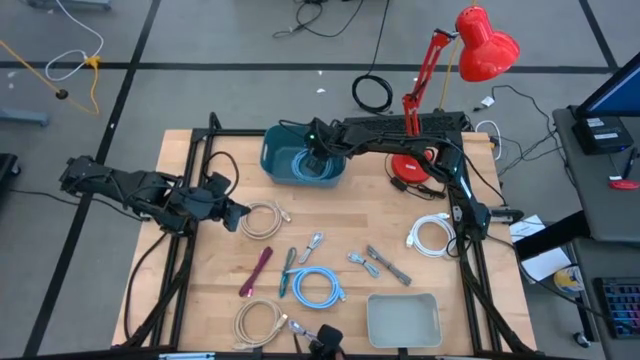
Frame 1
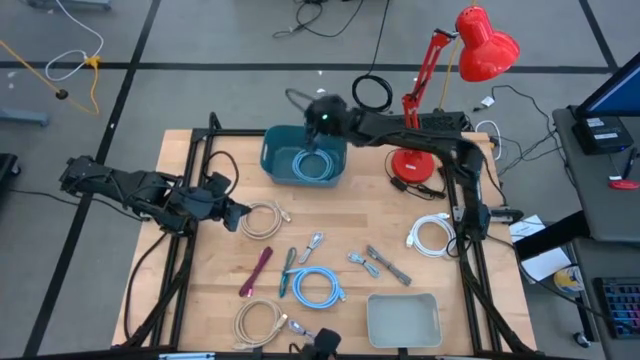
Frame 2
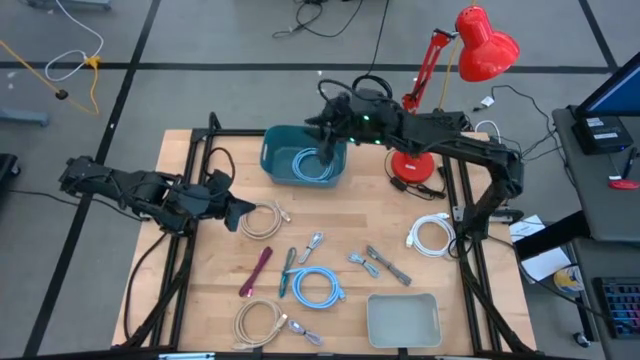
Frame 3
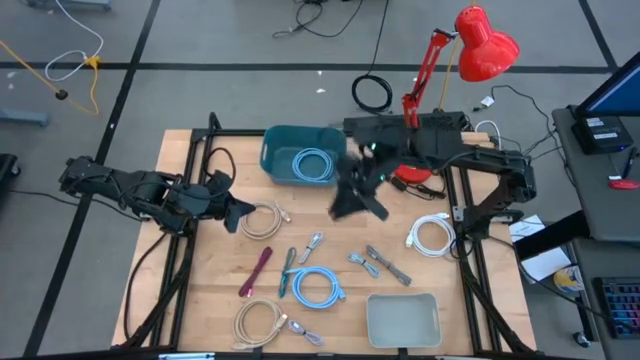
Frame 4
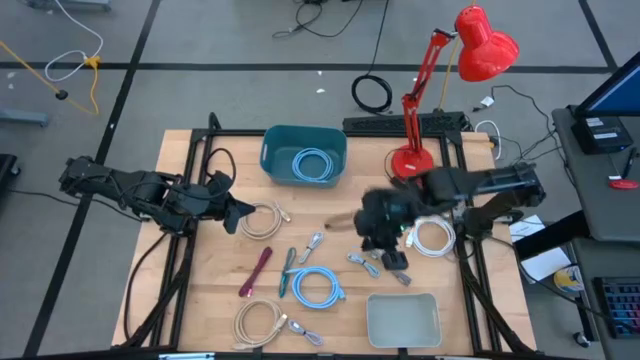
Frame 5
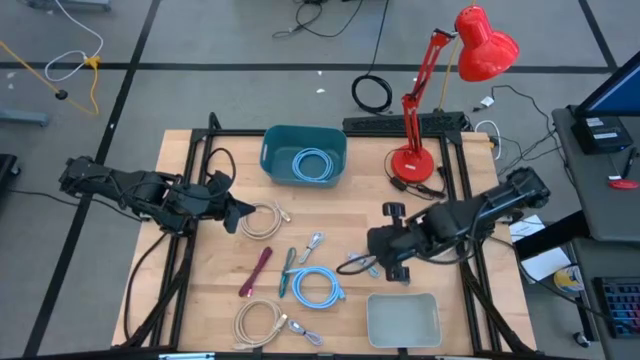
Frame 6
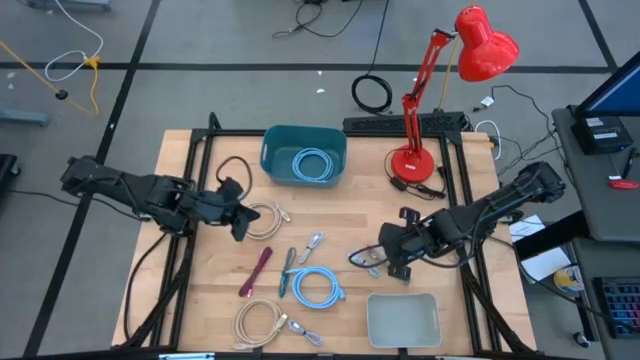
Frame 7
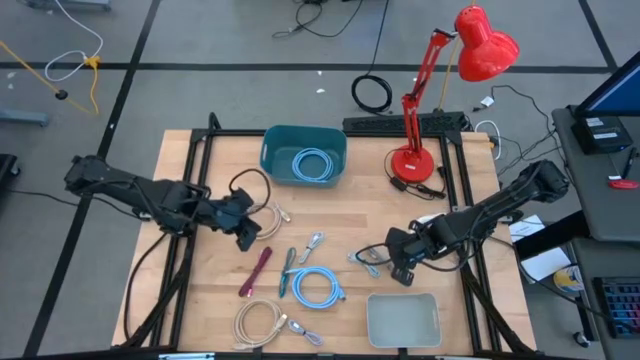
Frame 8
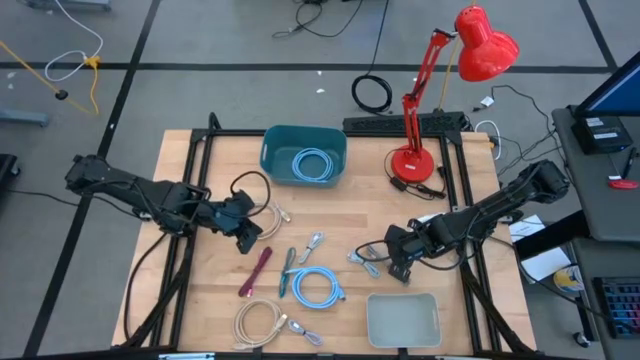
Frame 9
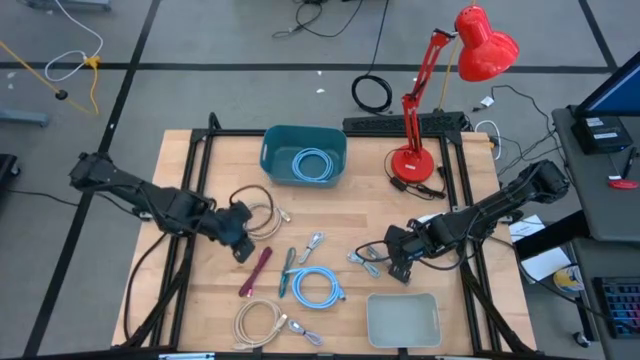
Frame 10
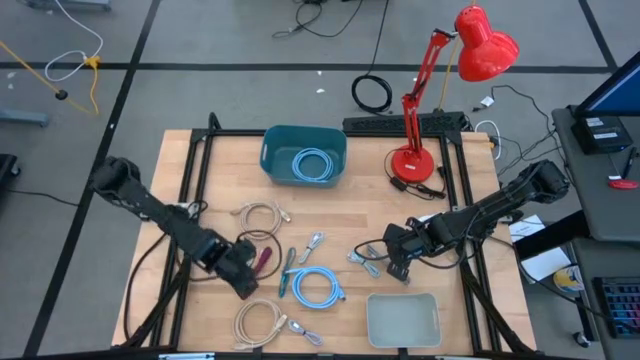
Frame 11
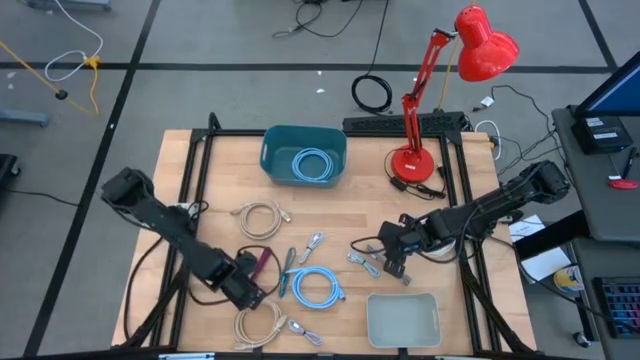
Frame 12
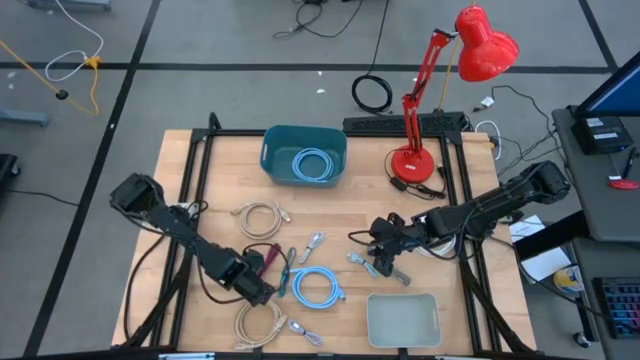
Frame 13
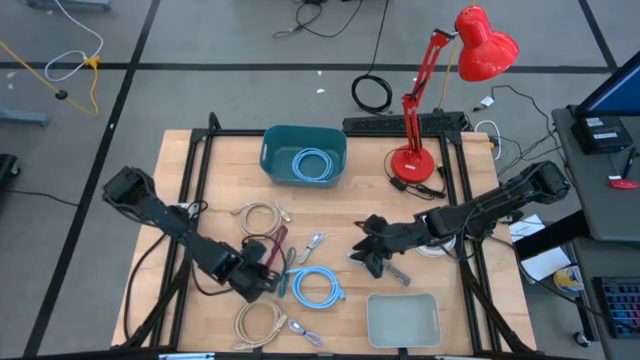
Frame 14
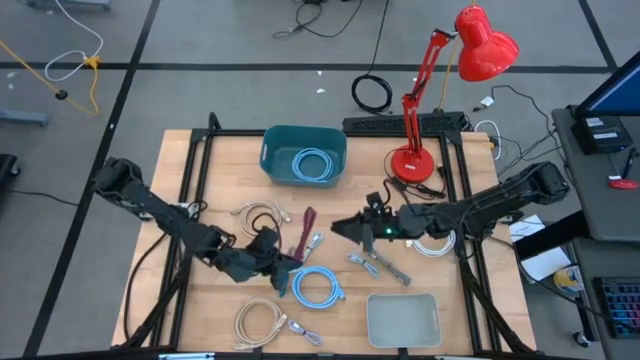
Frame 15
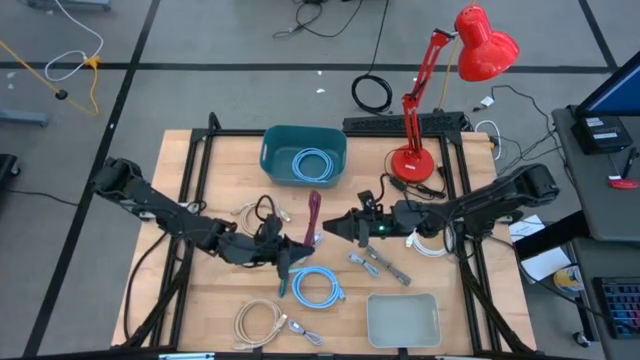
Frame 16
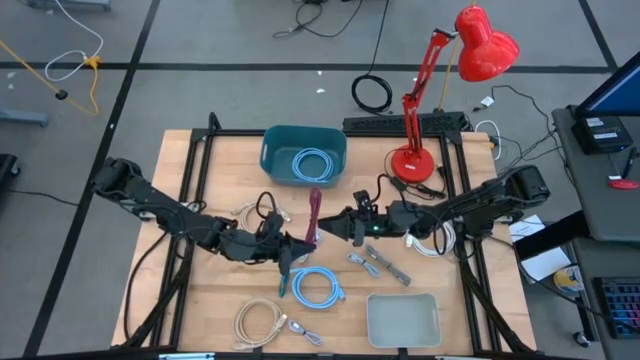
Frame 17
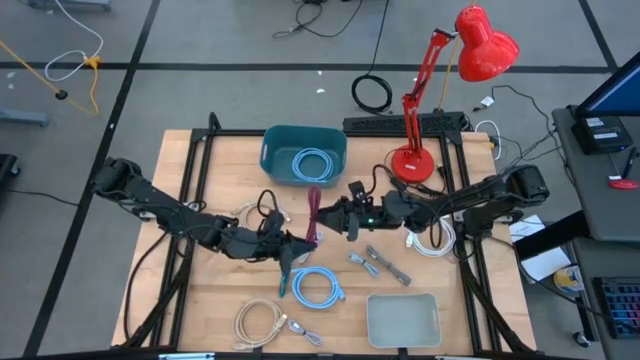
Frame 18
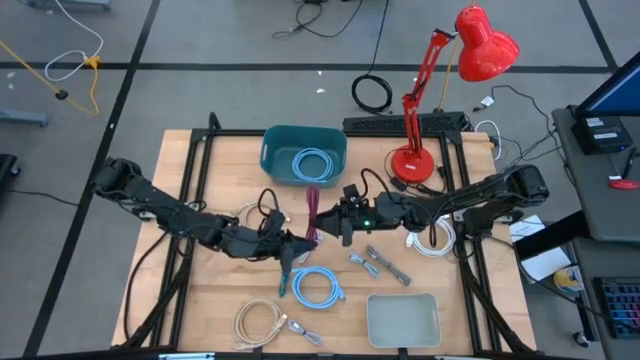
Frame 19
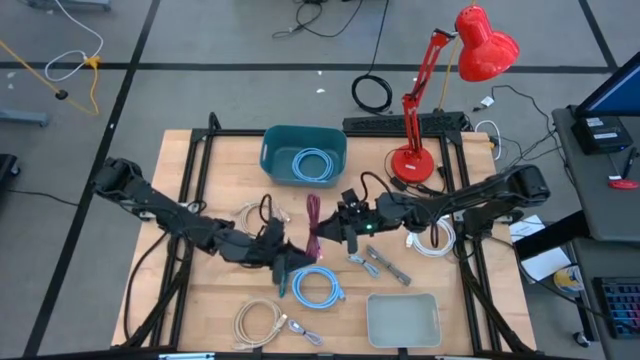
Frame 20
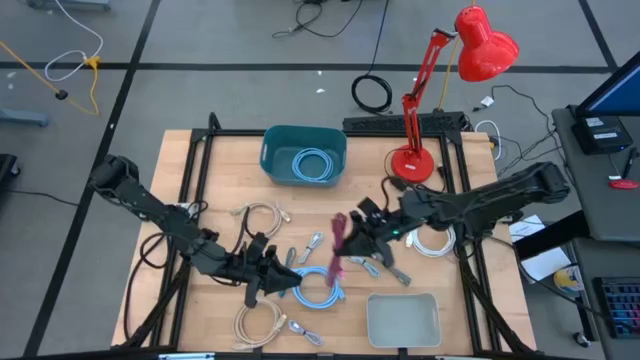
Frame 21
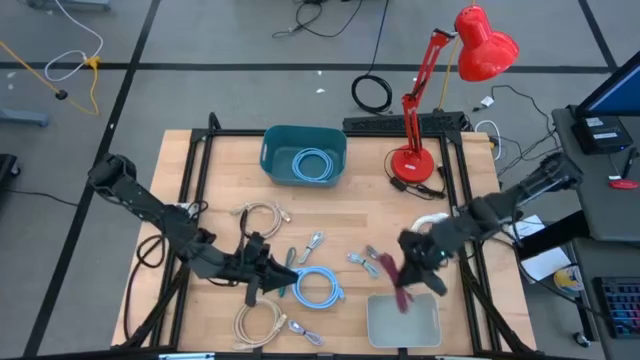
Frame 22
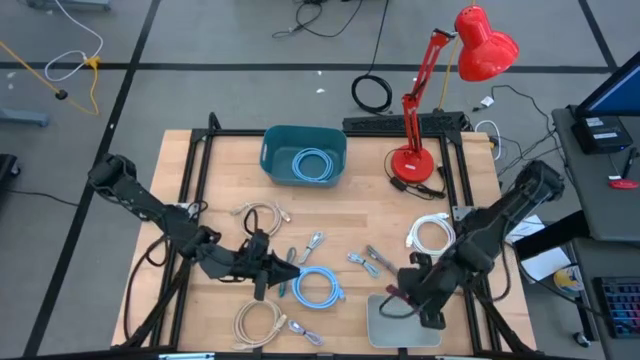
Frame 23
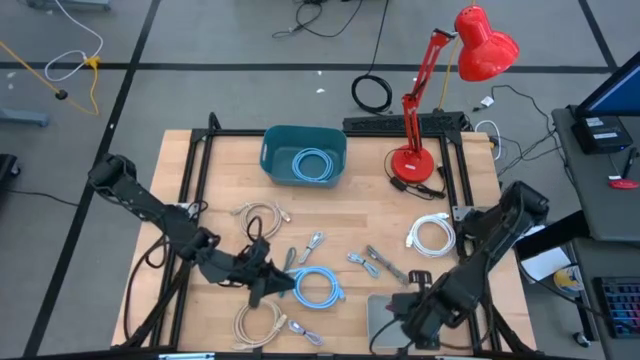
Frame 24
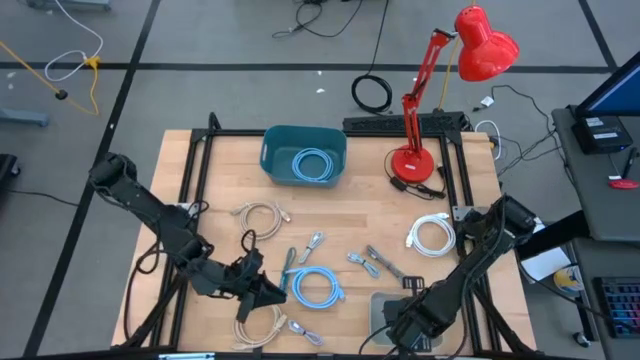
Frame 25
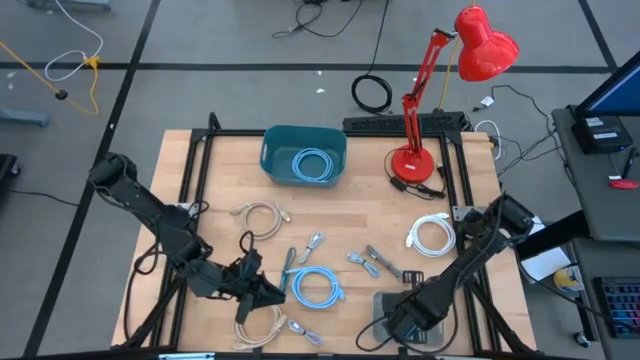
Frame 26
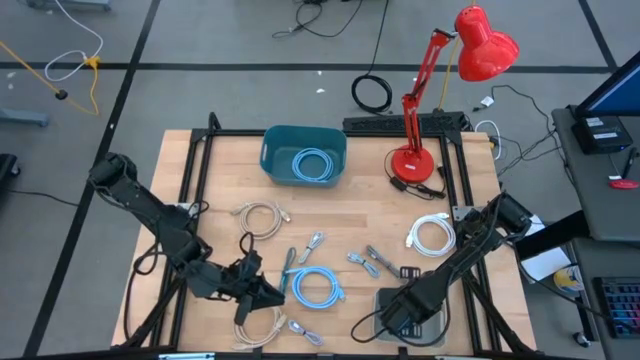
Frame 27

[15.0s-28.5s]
Task: Sort cables into bins
Put the red patterned charger cable into the gray bin

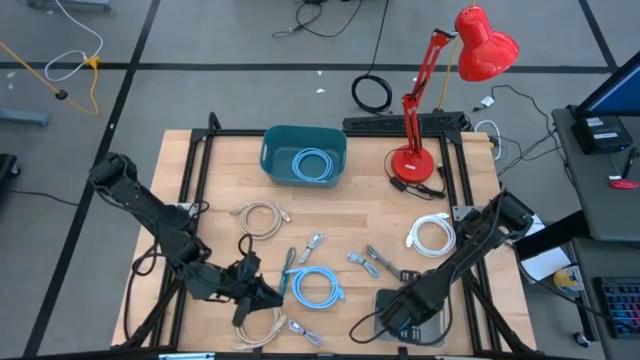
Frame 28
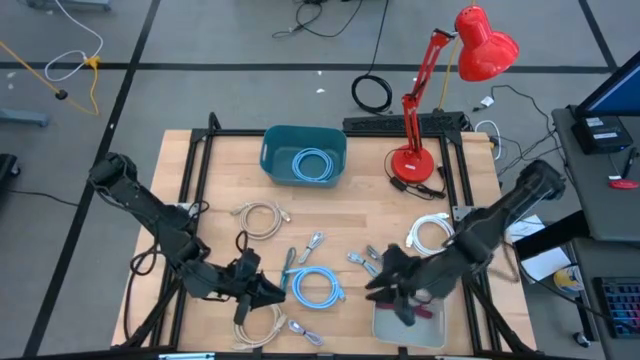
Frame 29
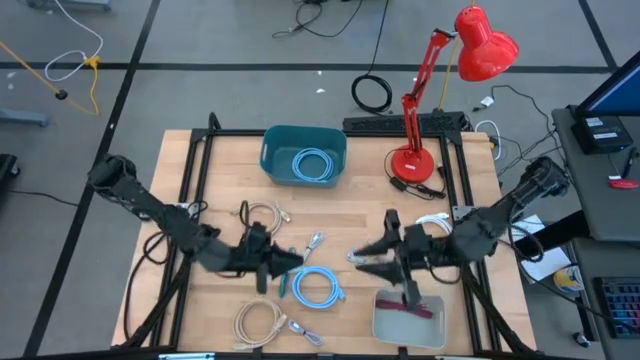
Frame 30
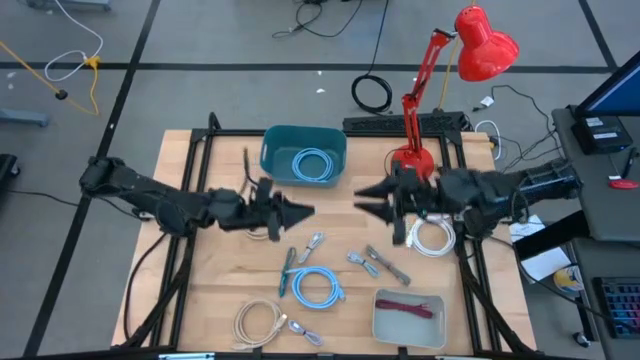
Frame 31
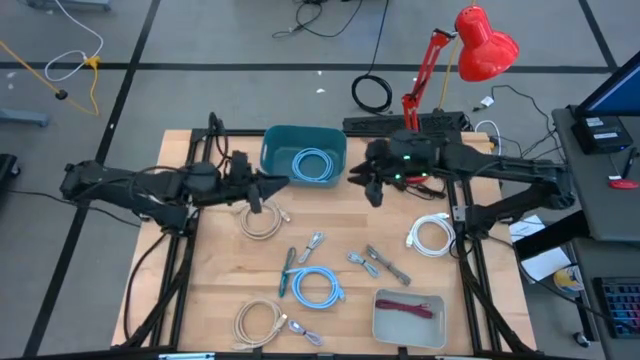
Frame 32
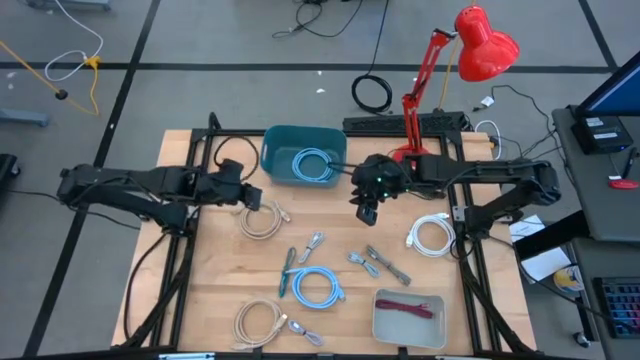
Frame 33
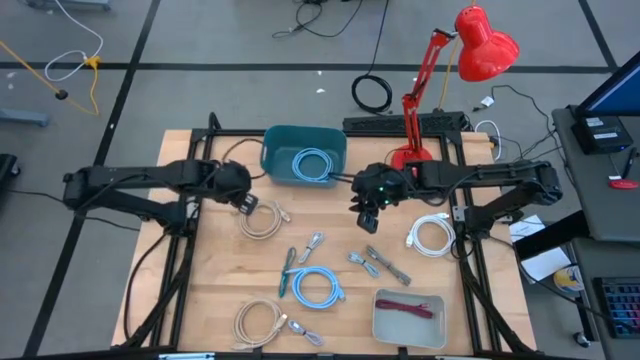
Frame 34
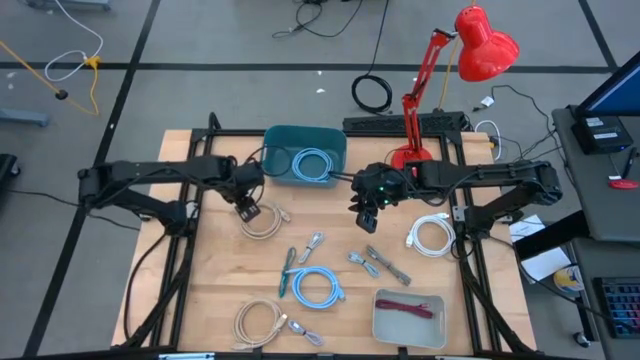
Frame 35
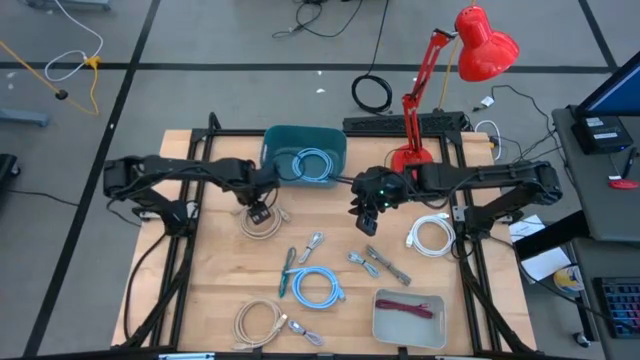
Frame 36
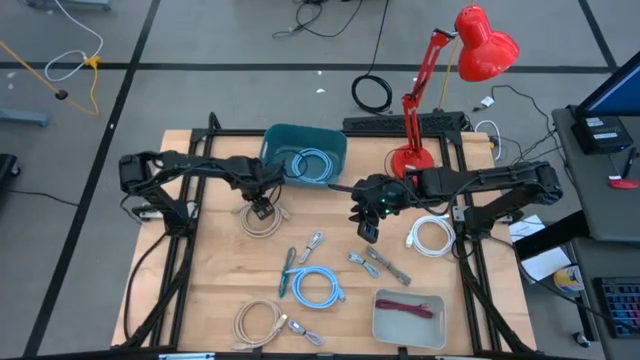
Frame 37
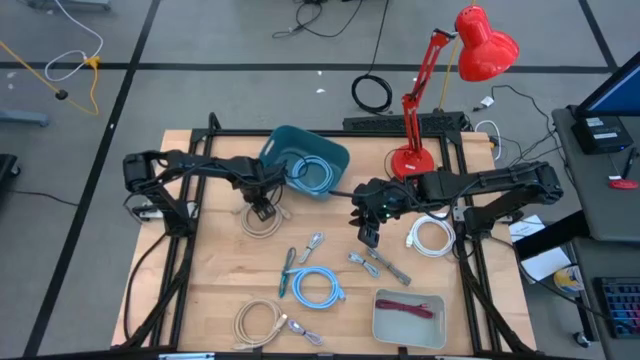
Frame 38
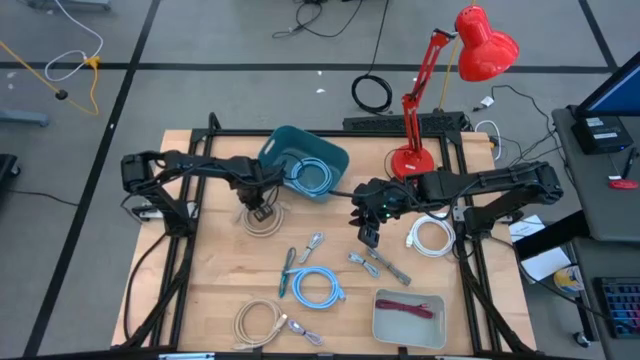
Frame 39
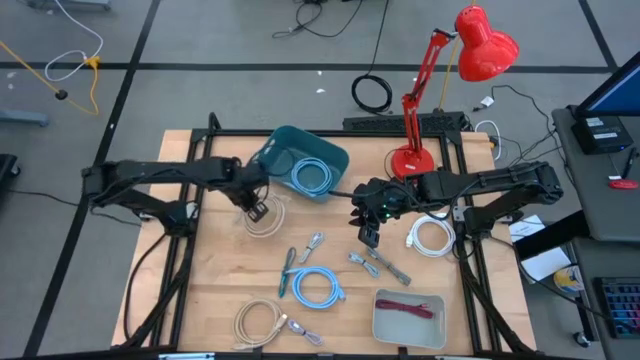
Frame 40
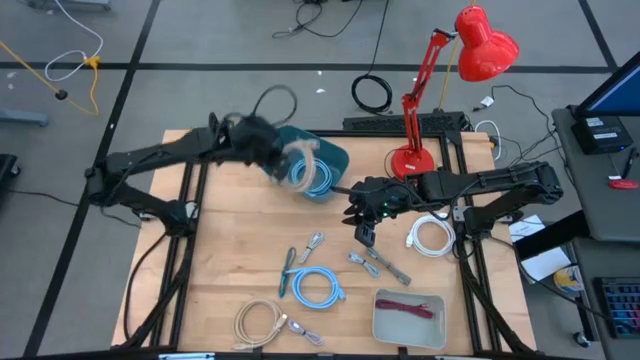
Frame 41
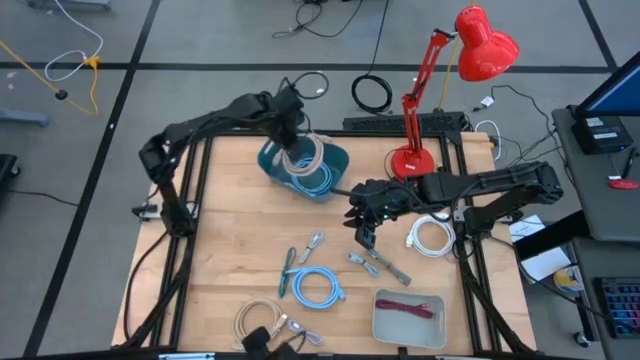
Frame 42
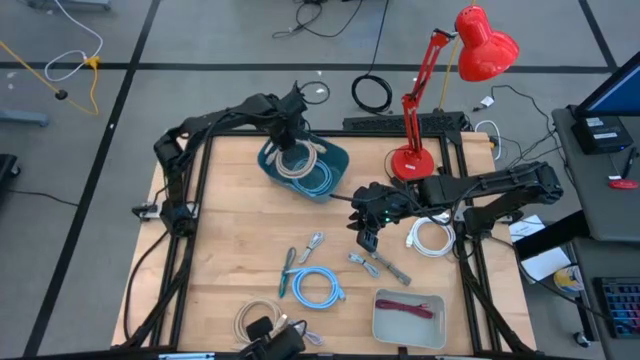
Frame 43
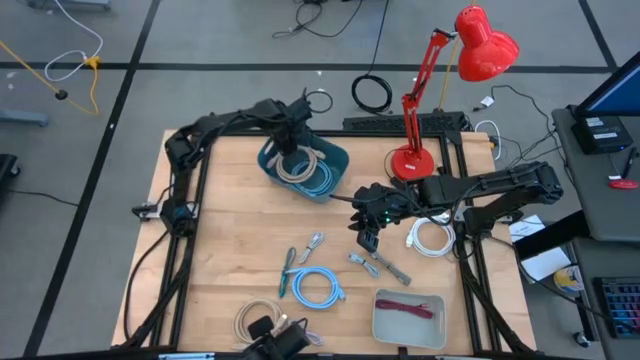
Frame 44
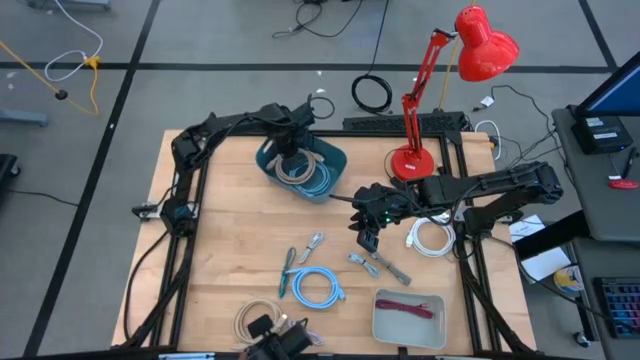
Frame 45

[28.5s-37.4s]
Put the top brown HDMI cable into the blue bin
